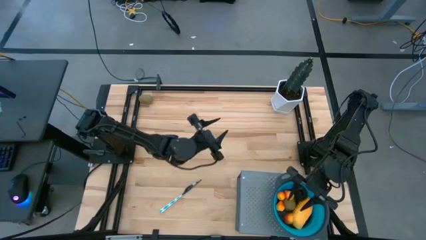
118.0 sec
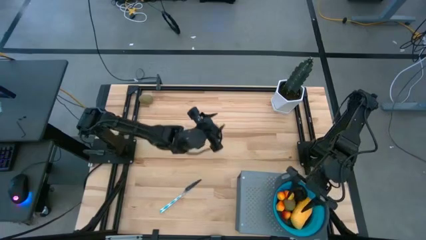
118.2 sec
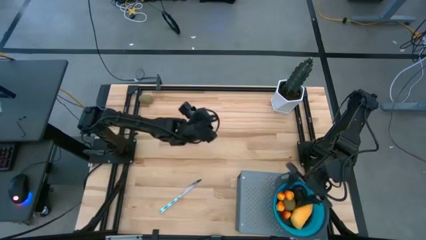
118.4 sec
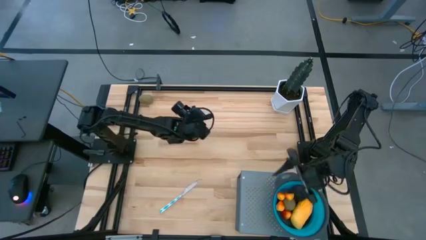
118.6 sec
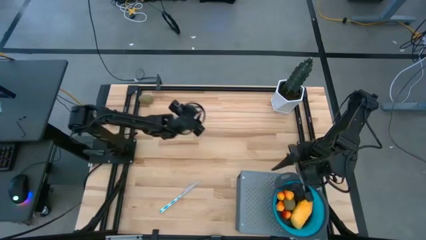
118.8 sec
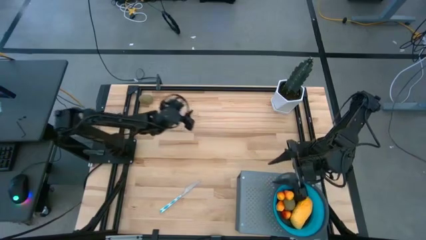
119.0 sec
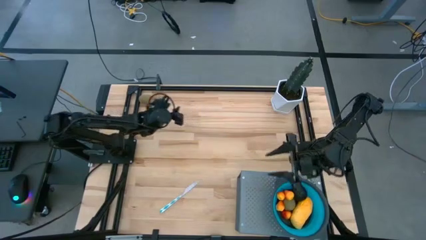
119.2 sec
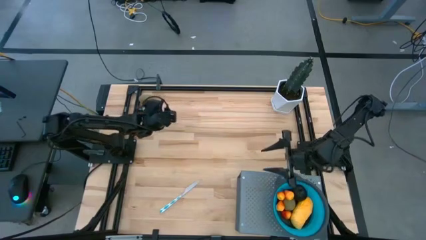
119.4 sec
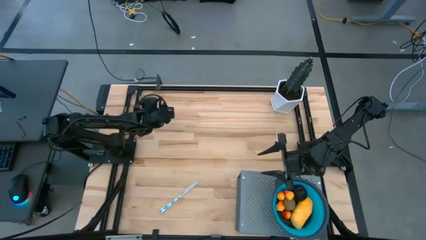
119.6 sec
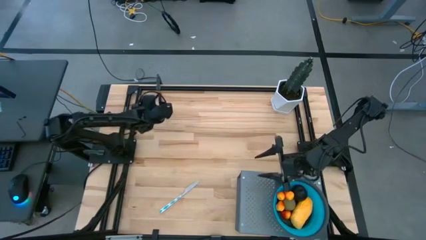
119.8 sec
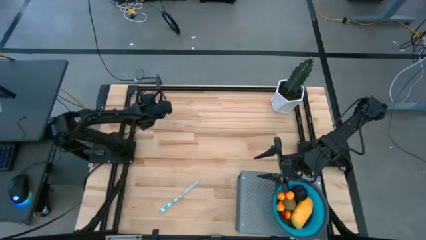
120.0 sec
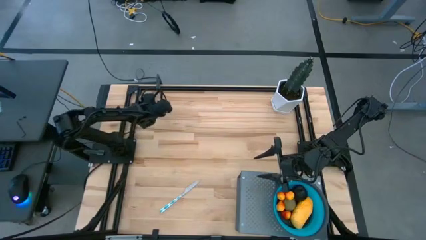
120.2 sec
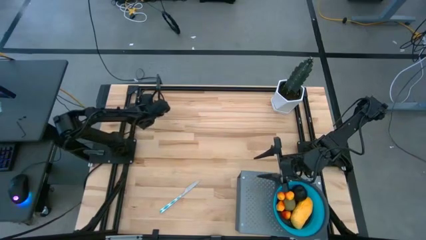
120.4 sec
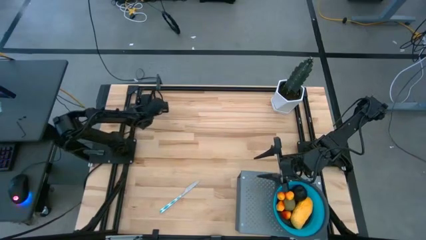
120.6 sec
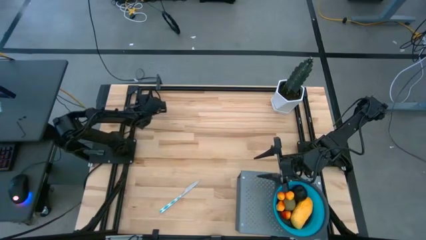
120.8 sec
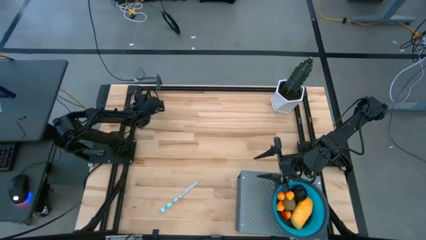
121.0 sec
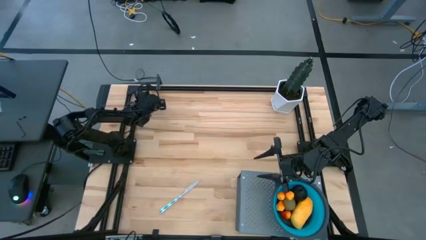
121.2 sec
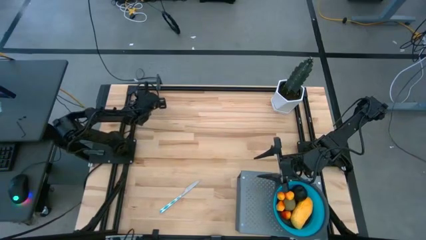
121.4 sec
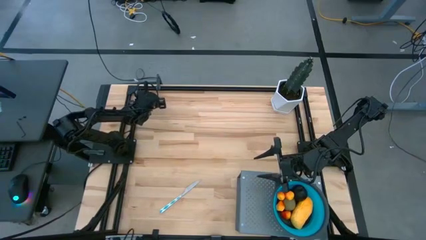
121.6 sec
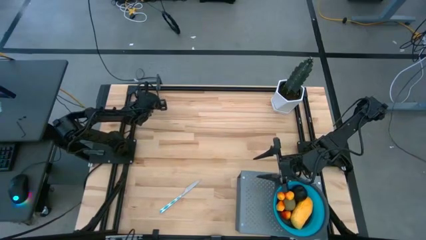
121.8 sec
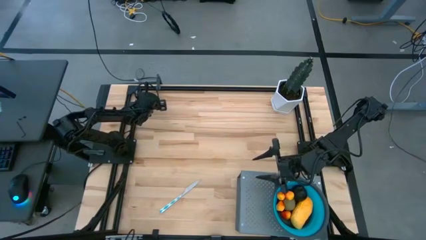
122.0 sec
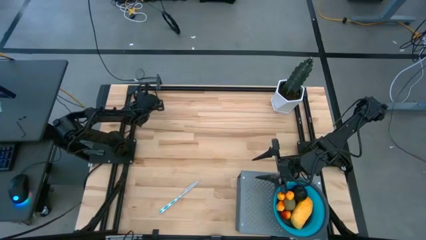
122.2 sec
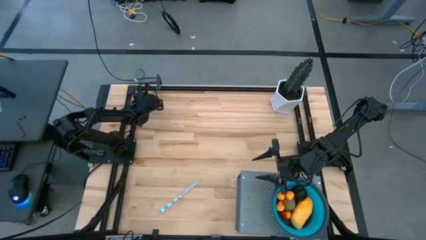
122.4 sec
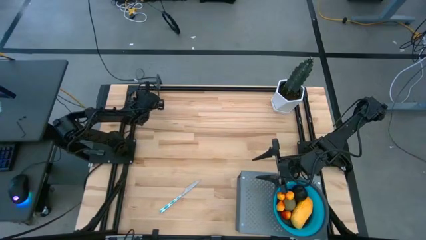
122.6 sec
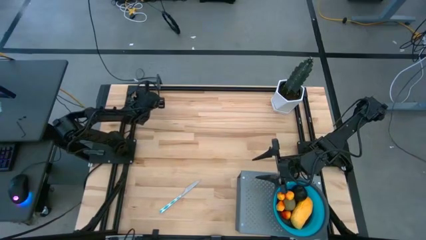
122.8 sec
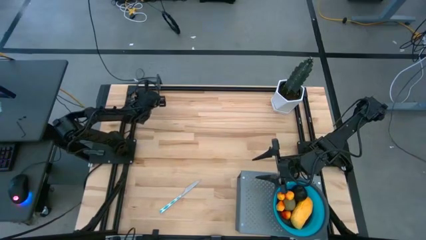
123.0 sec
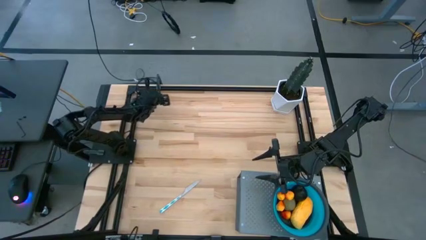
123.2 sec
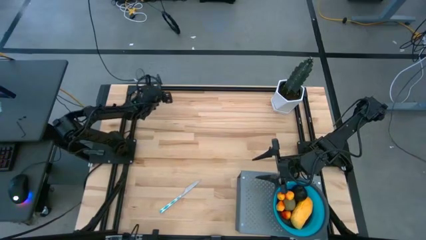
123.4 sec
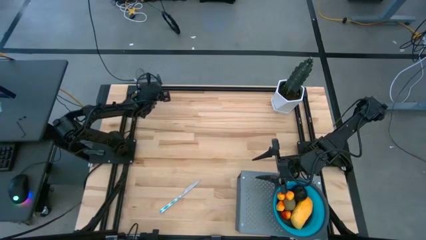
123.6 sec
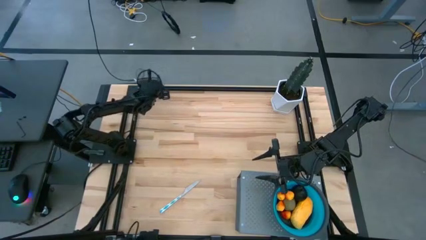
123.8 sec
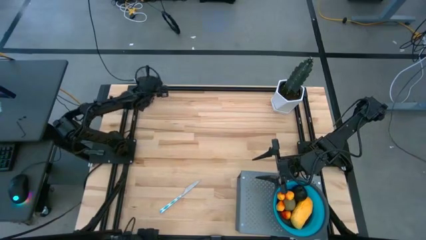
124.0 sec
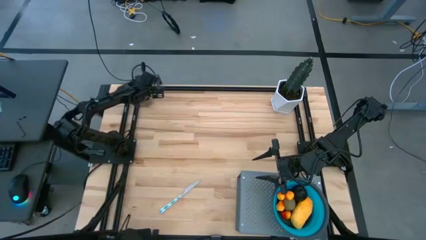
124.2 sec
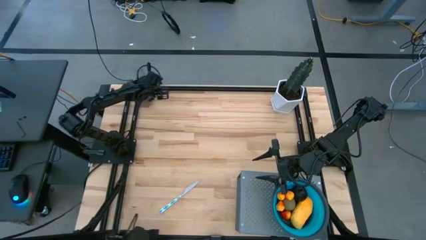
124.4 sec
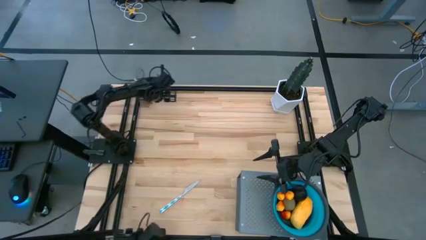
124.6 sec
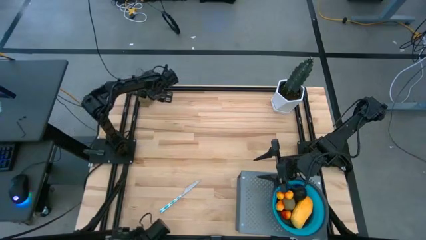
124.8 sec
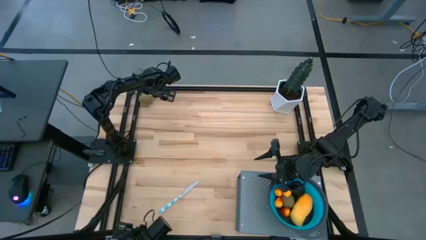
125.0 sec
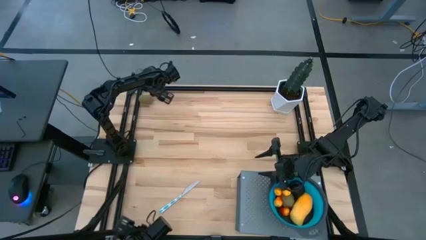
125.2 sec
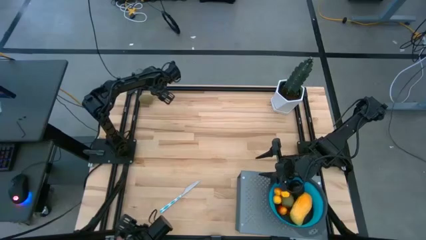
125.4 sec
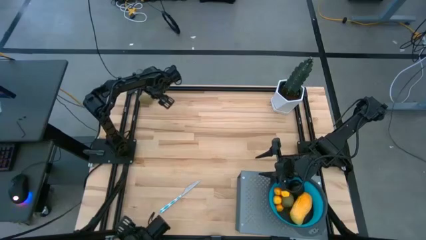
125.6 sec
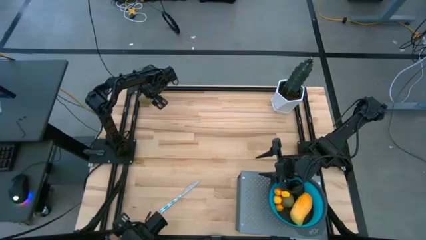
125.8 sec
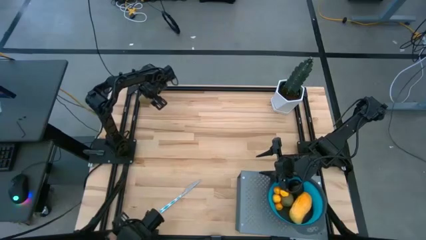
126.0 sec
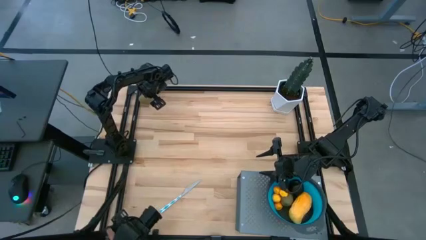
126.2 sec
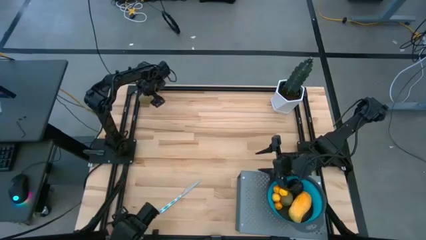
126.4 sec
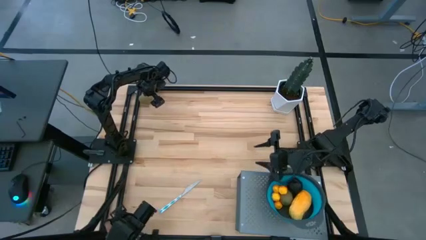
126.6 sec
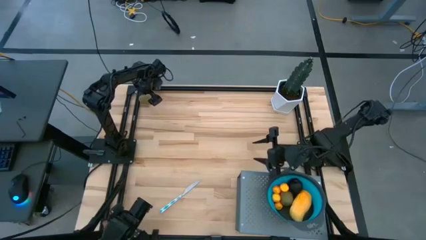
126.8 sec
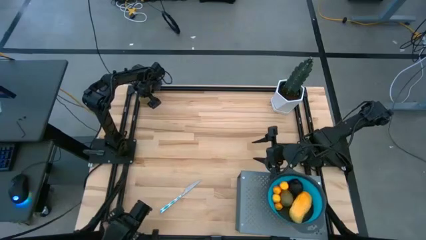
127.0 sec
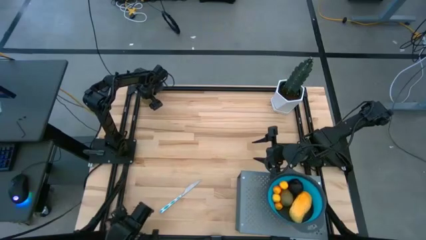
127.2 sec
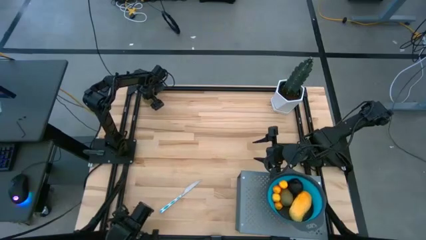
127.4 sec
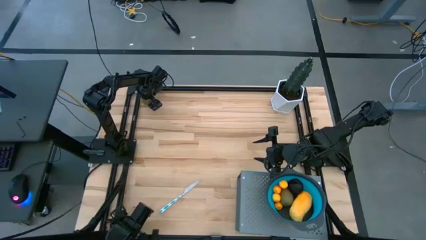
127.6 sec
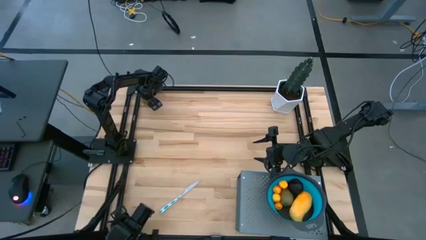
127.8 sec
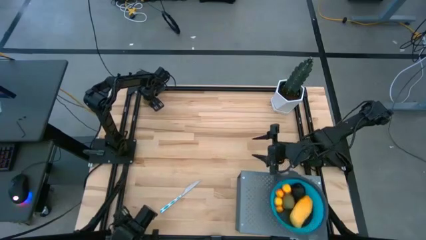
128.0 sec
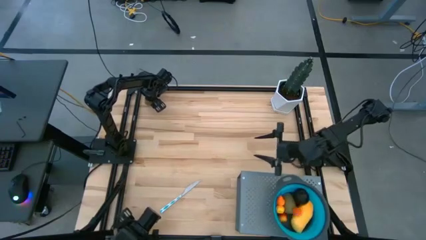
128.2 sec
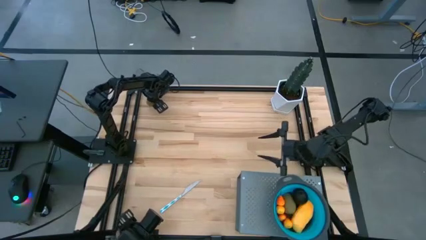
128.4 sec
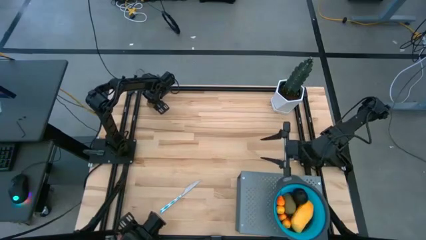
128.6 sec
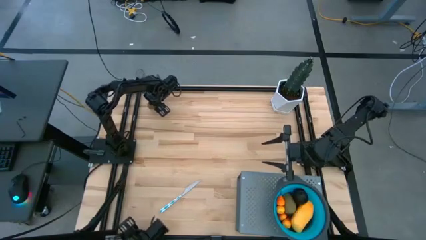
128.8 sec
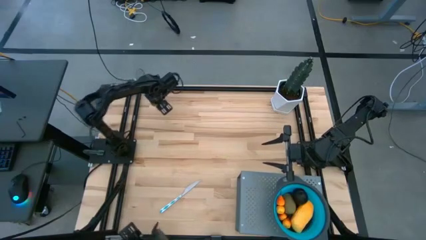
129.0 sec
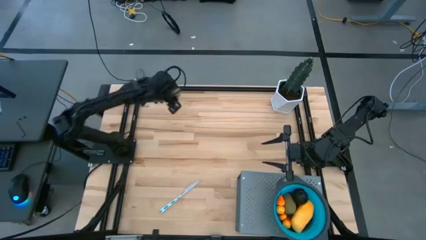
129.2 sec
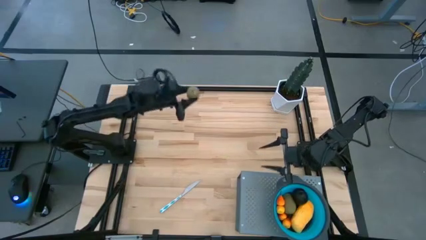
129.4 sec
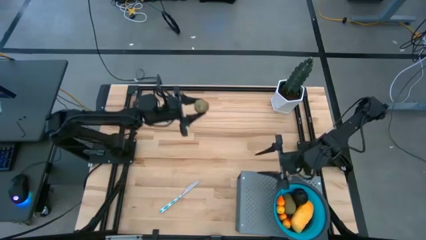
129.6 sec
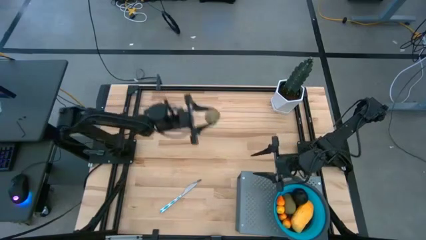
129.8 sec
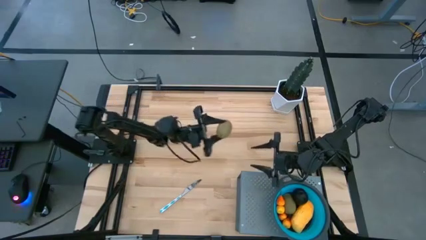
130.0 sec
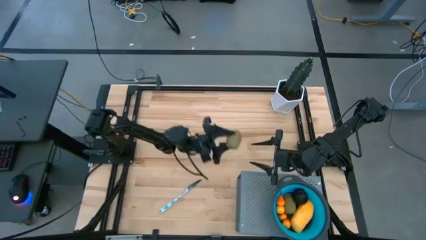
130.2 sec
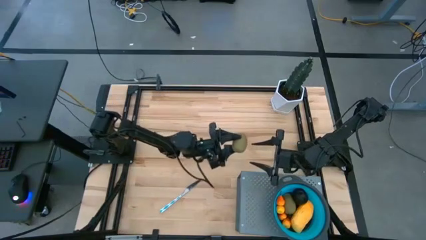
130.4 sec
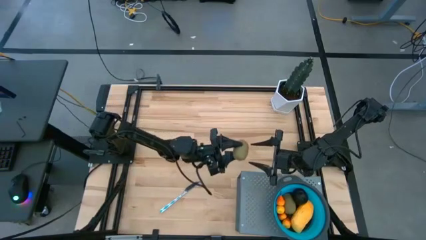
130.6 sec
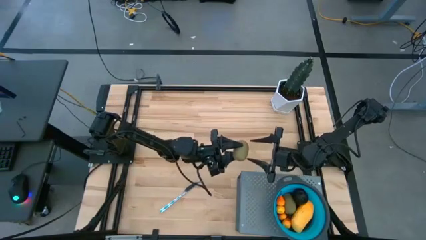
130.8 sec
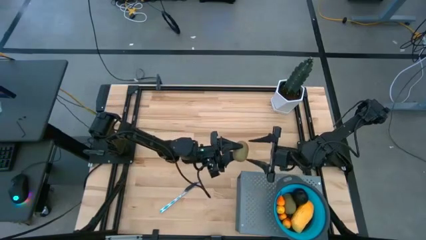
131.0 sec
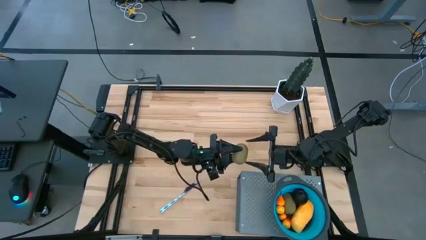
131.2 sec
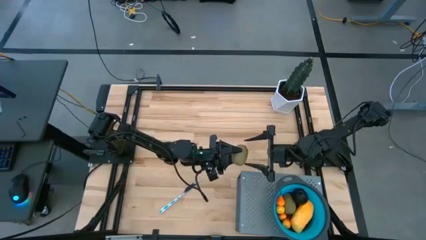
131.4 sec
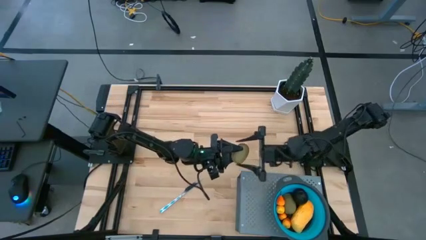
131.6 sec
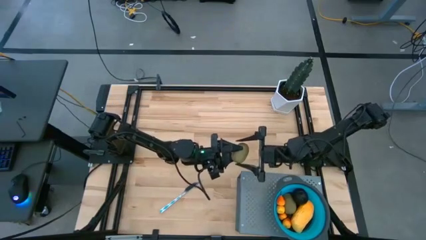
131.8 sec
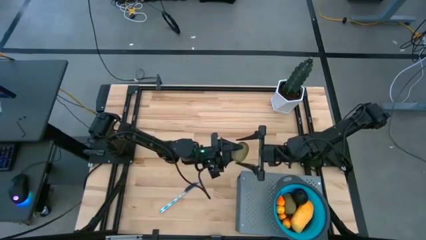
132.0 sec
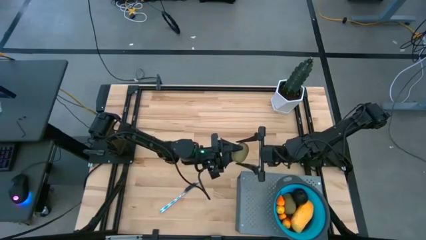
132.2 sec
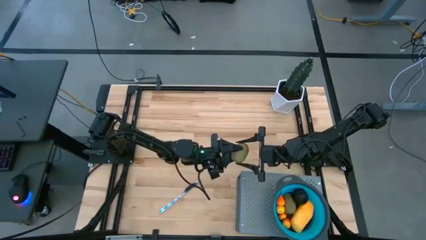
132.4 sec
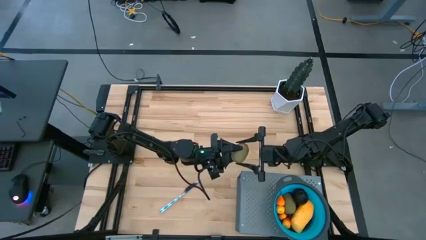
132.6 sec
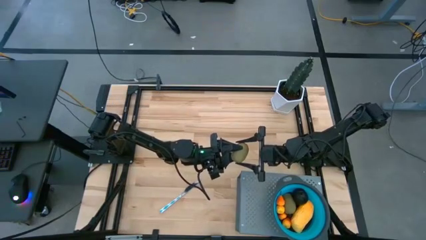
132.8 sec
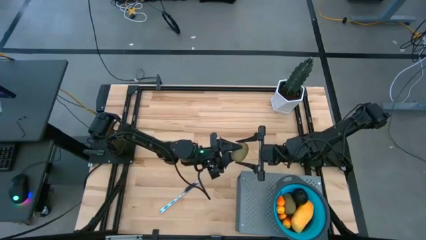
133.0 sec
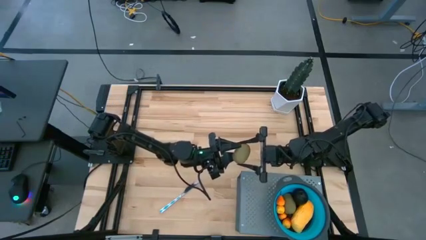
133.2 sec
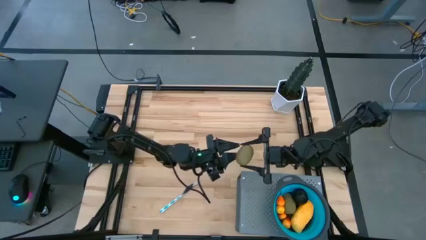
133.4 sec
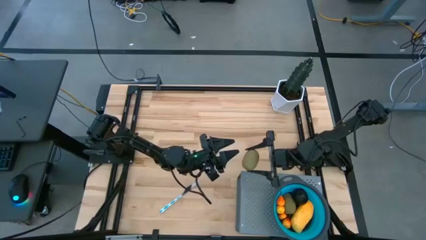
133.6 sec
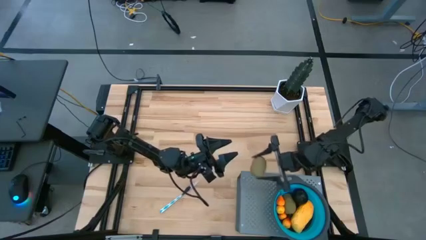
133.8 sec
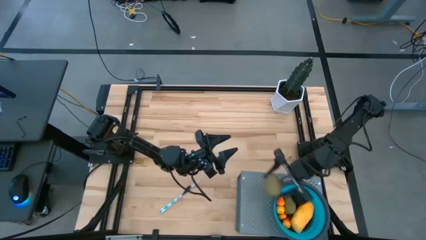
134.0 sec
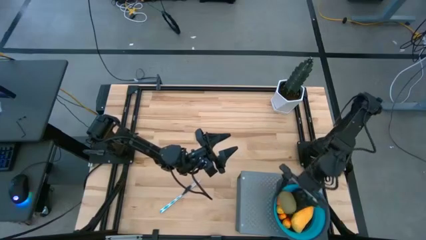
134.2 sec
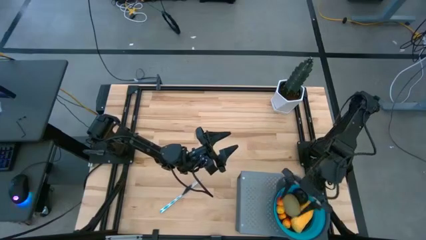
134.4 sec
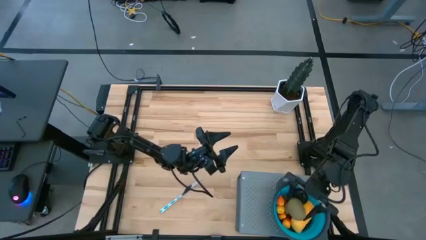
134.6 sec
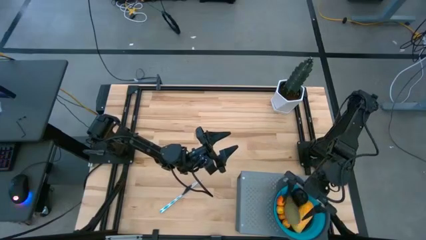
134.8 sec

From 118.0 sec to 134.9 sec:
Task: Pick & Place Fruit
Put the brown kiwi into the blue strainer bowl on the shelf
